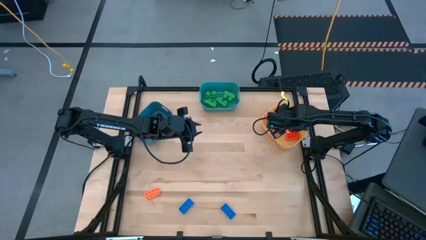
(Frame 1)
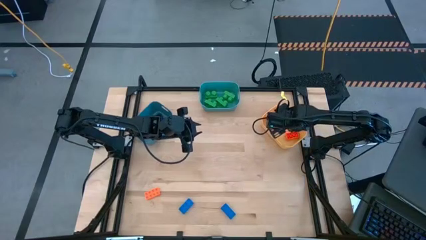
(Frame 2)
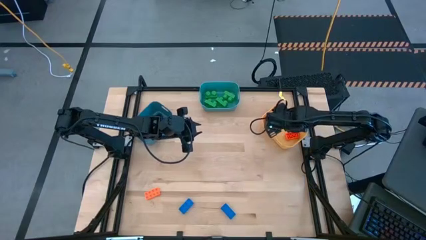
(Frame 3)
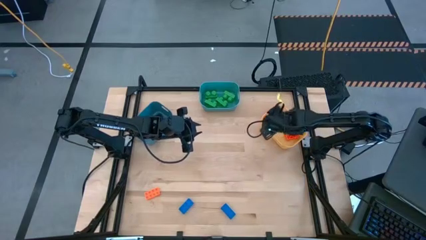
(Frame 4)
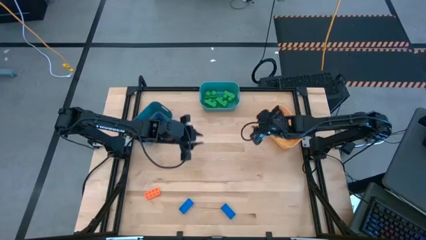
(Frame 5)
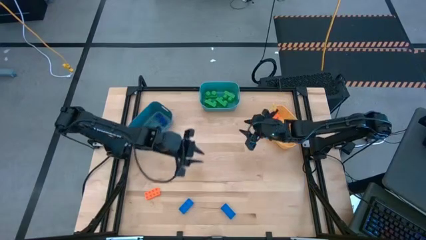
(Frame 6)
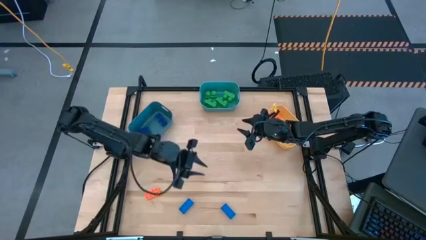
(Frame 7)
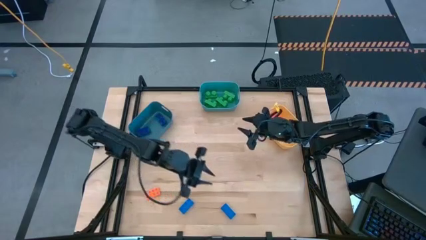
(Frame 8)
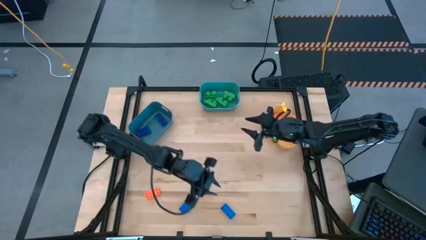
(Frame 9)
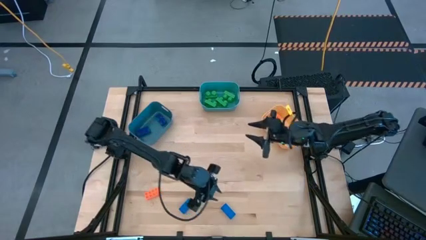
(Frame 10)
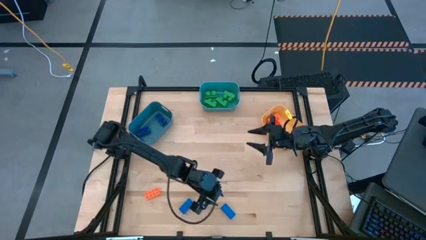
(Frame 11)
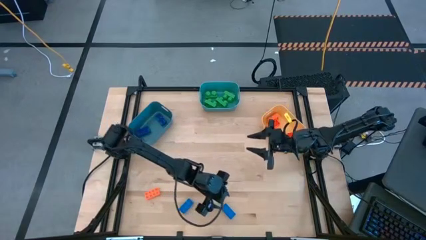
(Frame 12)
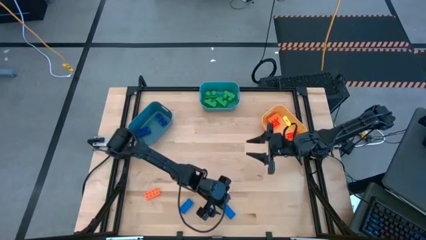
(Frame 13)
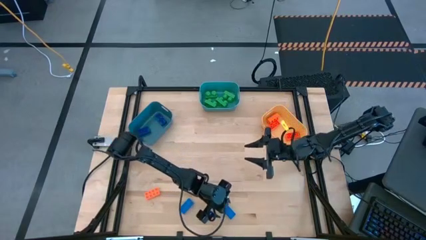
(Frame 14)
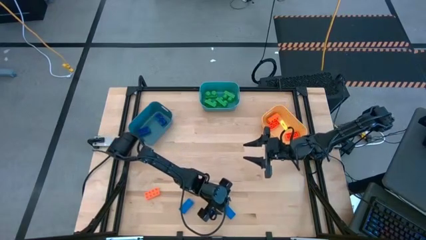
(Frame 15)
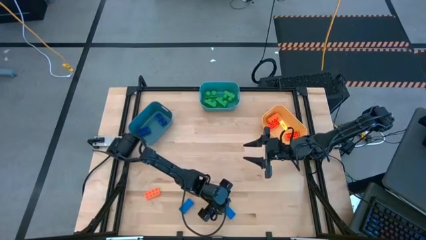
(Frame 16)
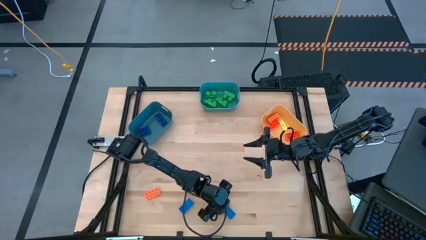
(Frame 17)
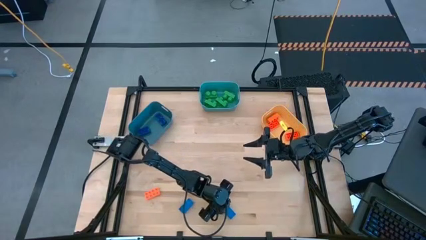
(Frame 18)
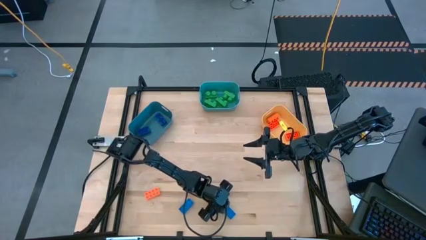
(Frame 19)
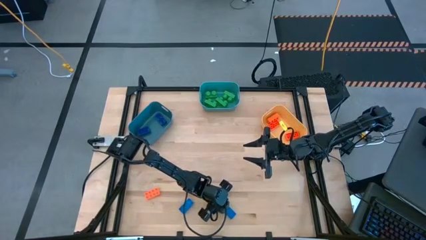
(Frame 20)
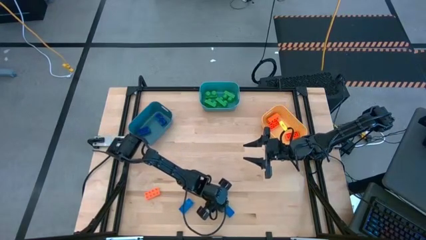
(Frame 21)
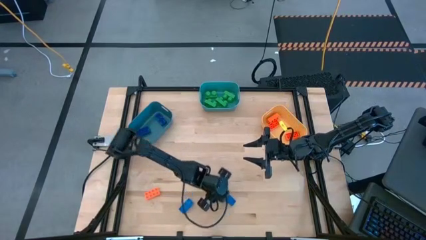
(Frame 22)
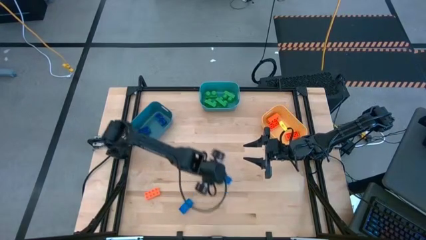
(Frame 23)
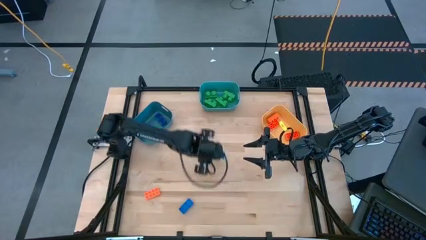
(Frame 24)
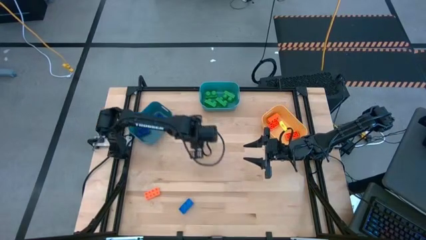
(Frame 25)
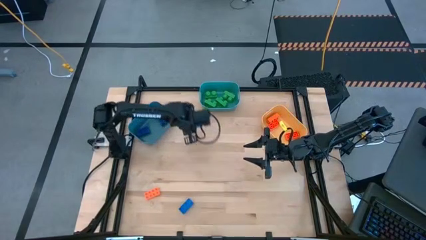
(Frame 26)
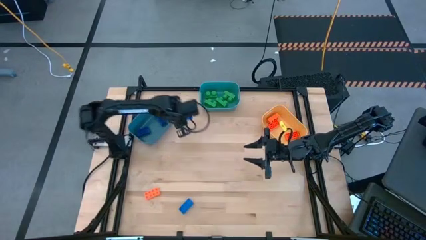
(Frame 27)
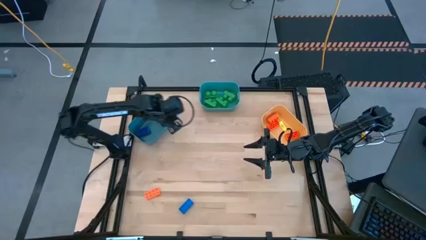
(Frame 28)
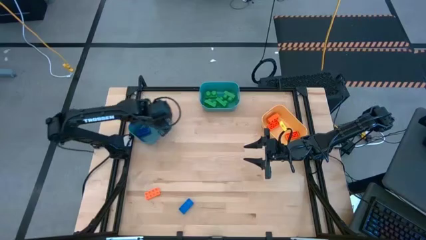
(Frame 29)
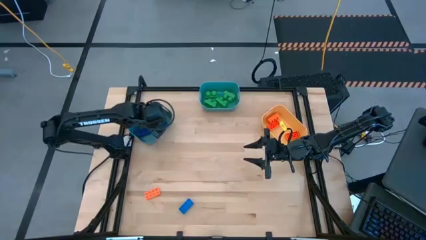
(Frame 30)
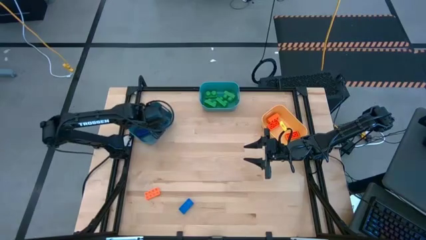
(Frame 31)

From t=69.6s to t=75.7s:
Task: Sort & place blocks by color
Put the blue game piece into the blue bin

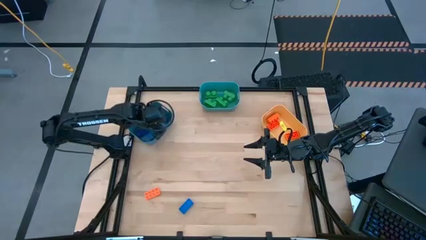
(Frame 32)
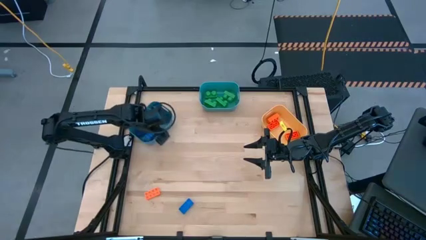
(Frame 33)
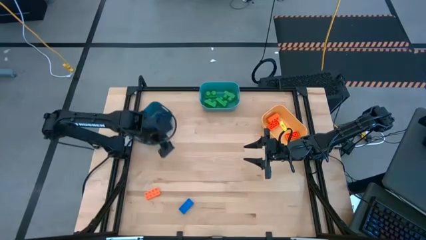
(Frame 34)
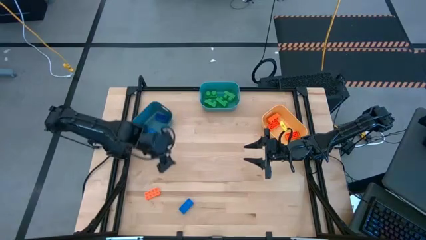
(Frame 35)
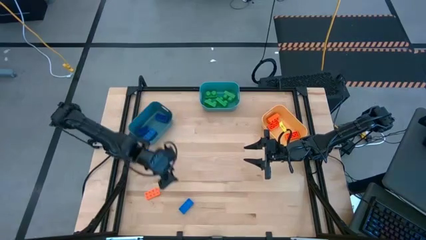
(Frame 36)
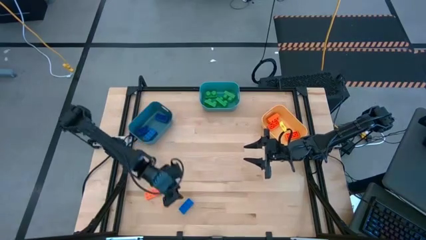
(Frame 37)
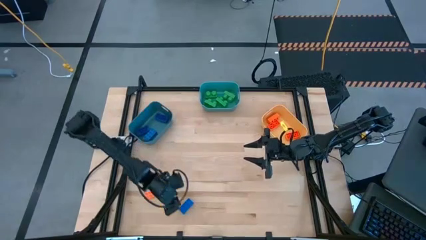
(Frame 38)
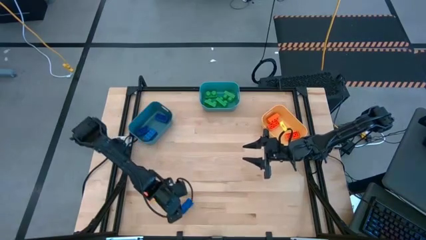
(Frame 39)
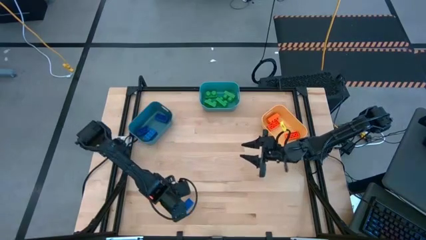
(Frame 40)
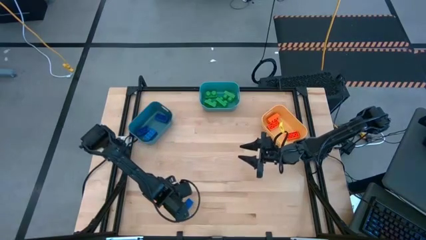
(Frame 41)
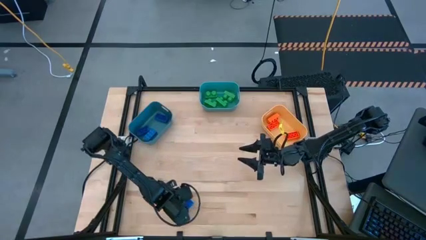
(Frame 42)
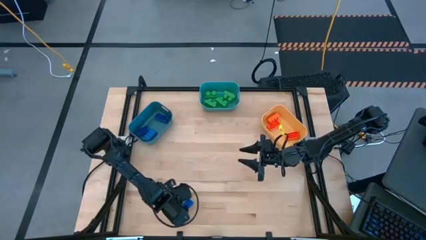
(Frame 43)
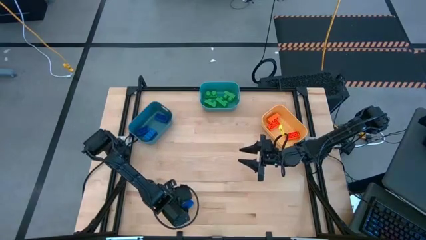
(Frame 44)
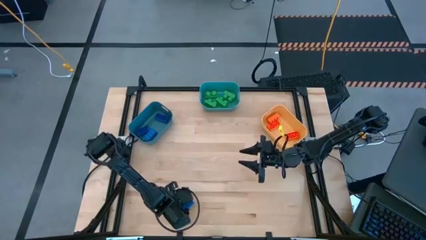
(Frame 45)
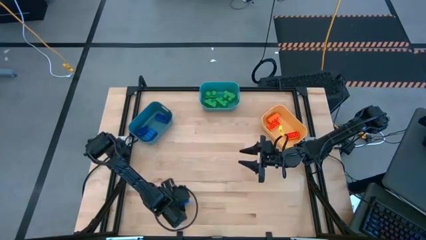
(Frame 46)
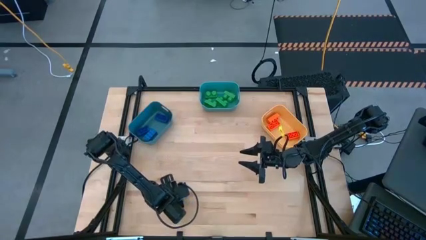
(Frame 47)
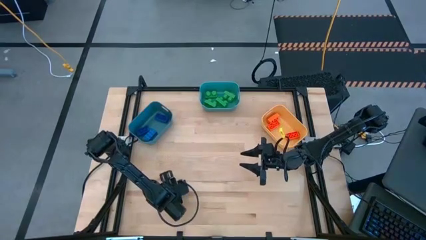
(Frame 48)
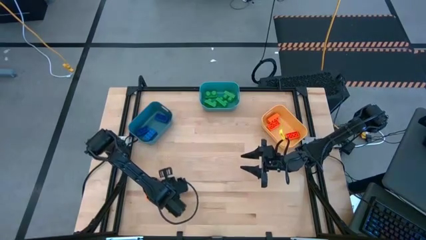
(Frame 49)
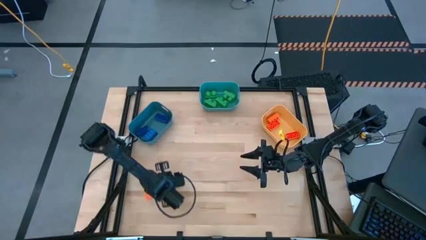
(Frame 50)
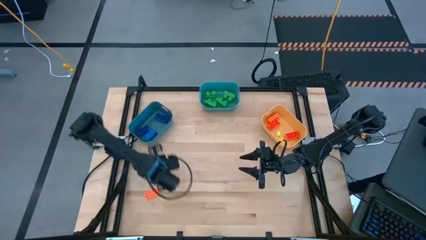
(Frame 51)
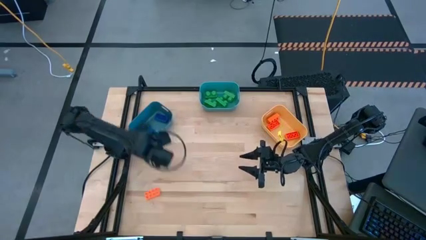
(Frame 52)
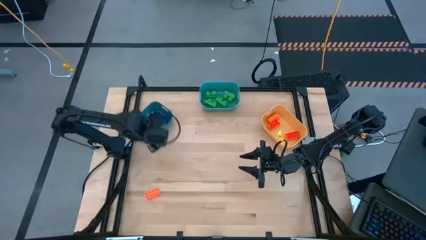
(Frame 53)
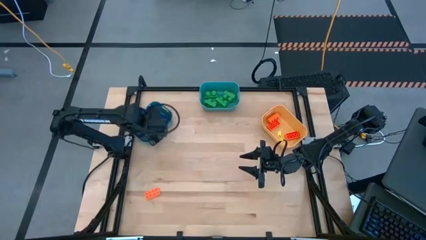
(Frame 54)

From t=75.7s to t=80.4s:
Put the blue game piece into the blue bin

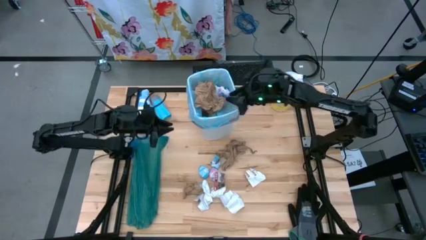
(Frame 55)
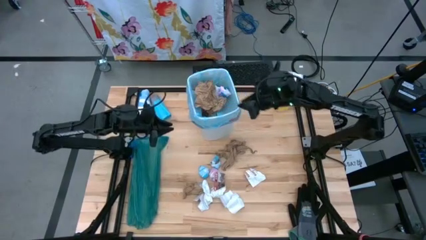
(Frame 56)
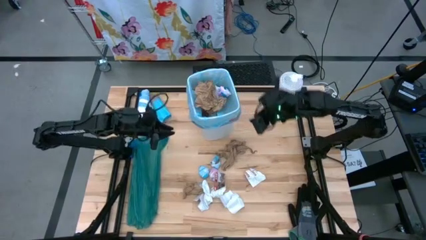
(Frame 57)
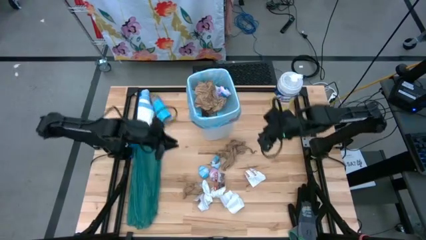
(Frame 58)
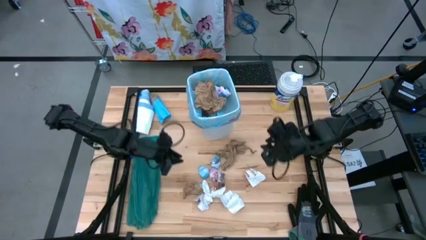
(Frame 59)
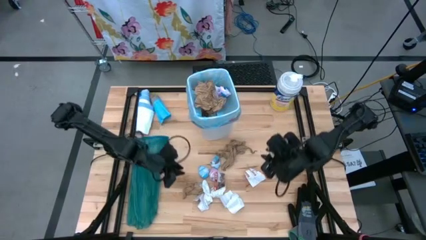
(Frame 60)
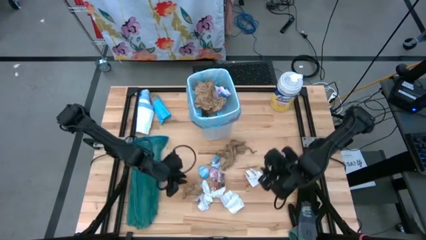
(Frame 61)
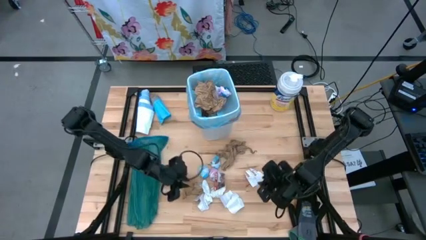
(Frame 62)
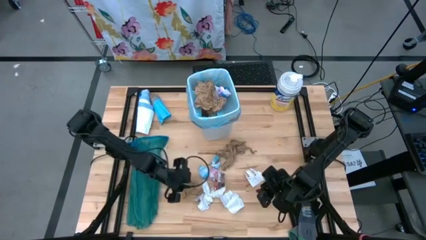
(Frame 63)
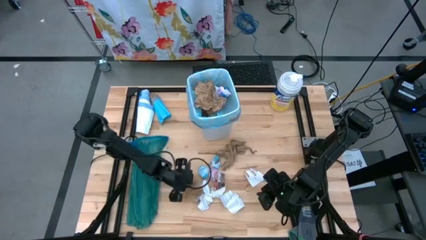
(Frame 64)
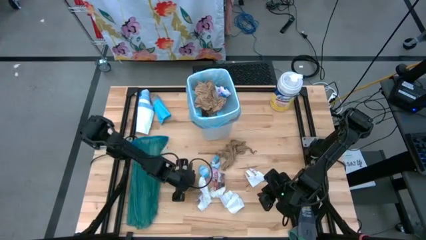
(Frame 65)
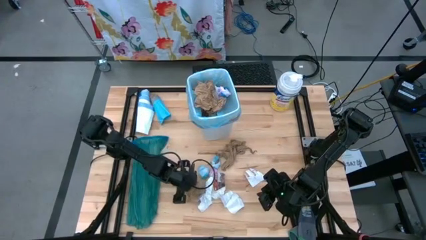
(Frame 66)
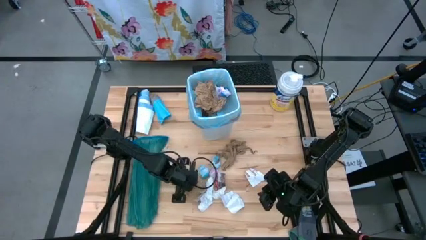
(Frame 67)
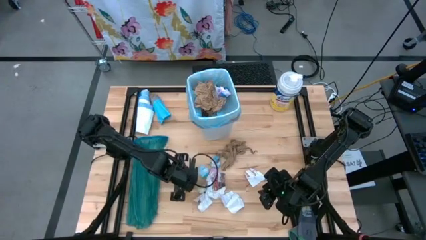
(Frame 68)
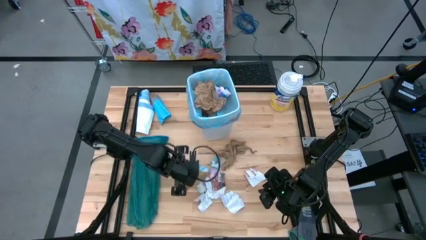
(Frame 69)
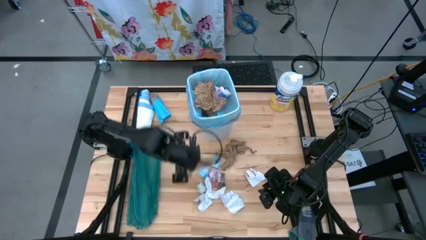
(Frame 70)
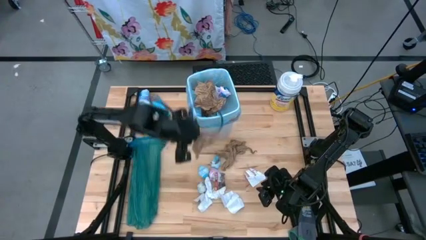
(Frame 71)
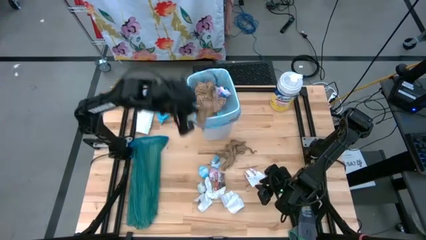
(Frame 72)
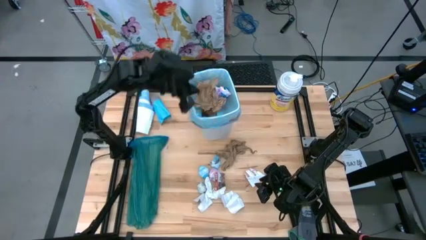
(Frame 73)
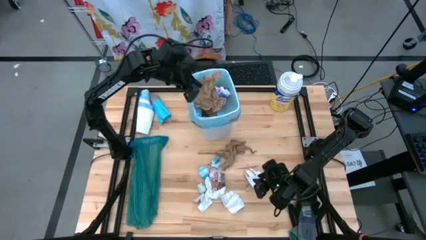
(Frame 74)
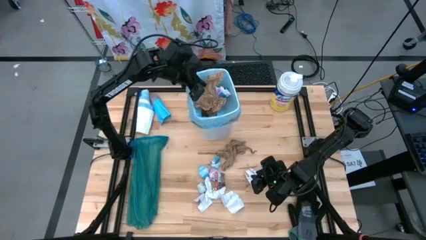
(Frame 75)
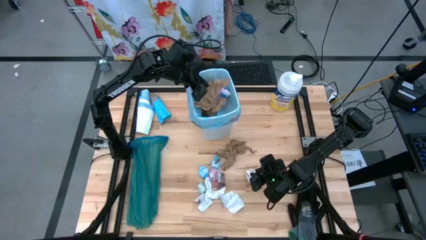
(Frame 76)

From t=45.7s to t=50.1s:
Task: place trash/remove bag and relplace
Put the brown napkin in the trash bin
